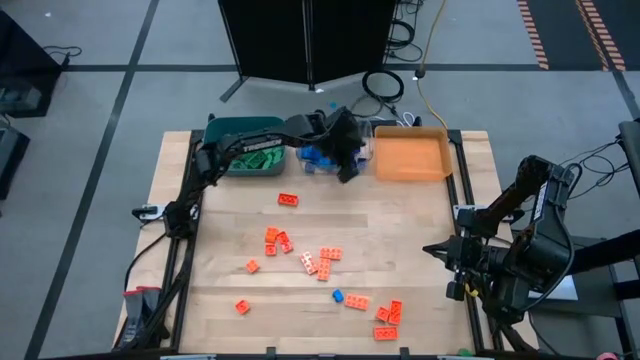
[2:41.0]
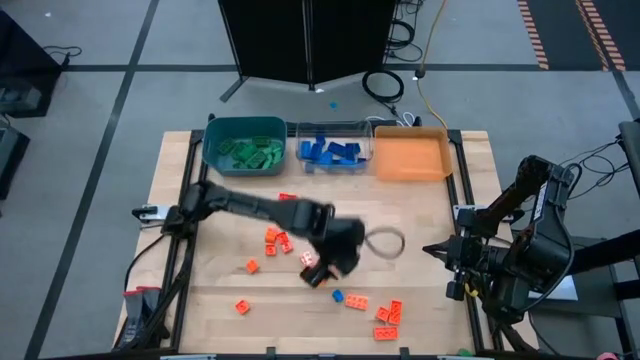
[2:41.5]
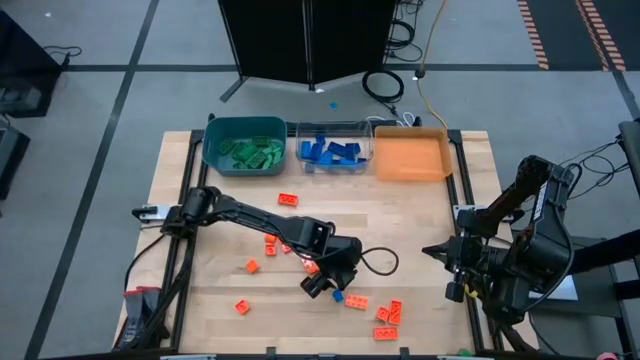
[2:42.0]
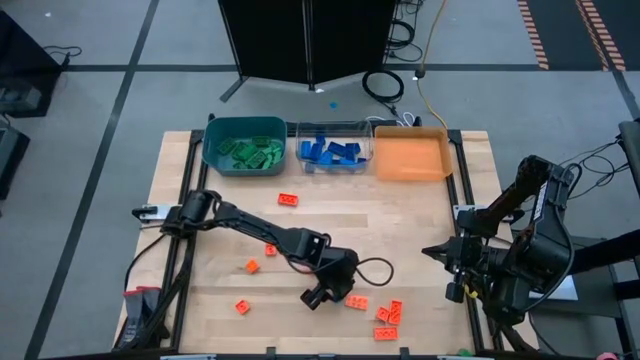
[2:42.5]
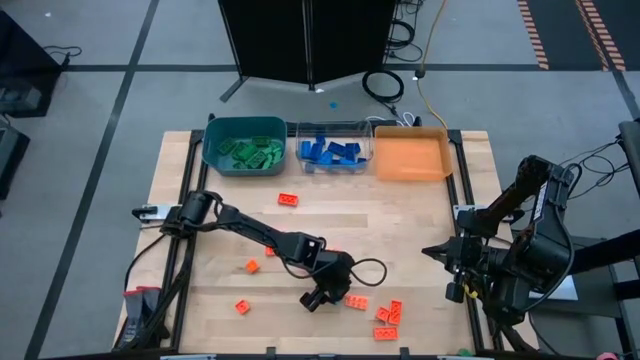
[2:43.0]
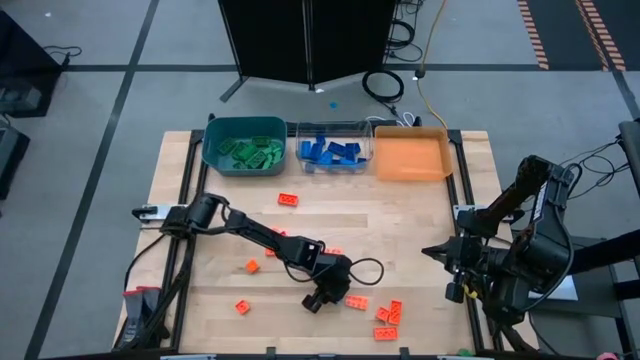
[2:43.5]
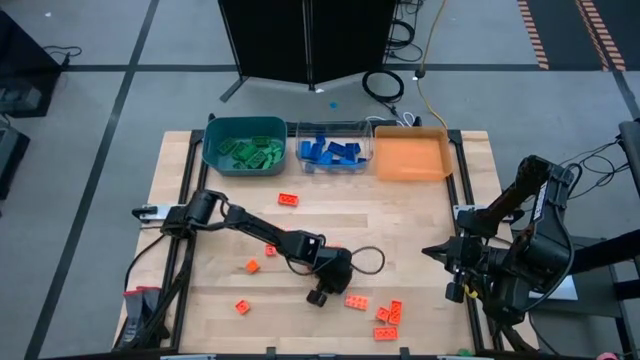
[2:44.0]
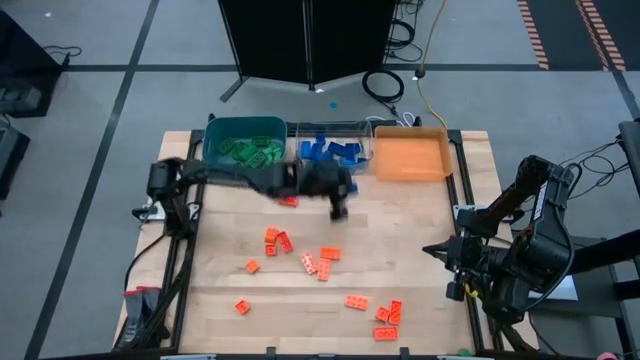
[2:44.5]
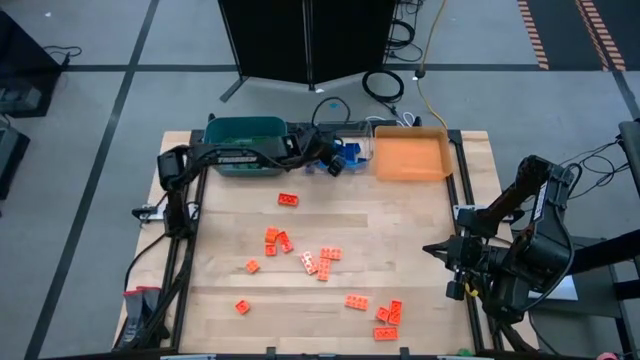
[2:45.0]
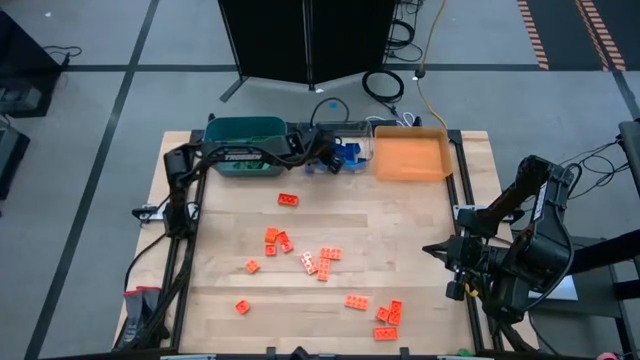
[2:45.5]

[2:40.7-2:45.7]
Task: Sort blocks
Put the blue game piece into the transparent bin

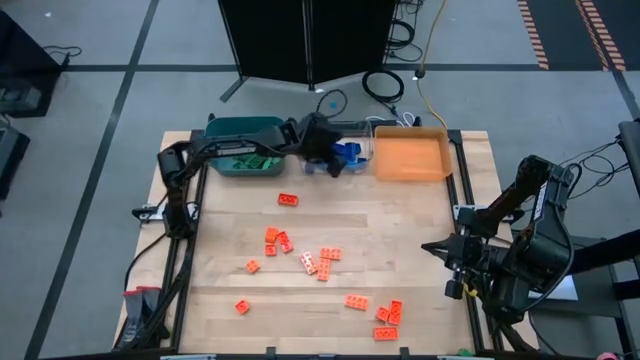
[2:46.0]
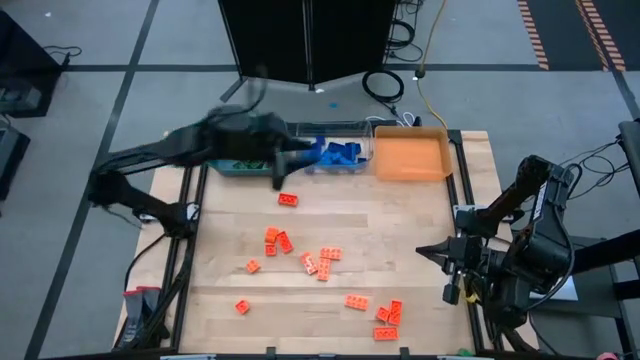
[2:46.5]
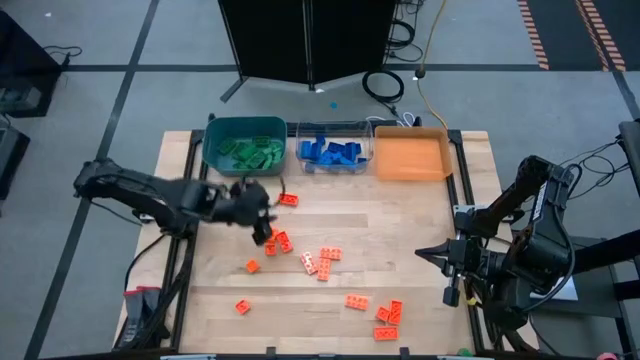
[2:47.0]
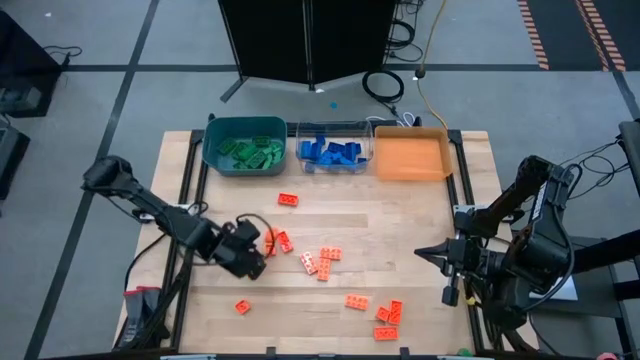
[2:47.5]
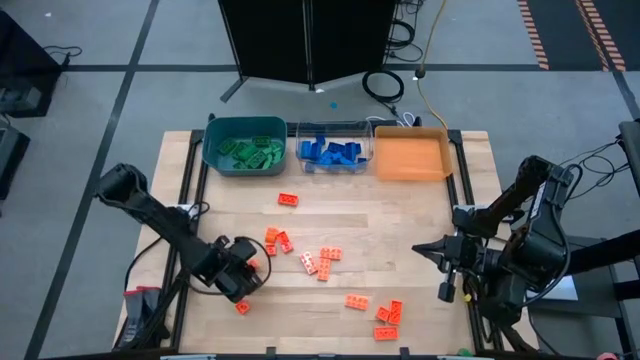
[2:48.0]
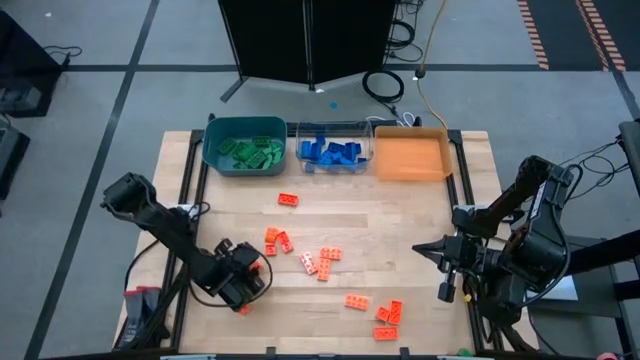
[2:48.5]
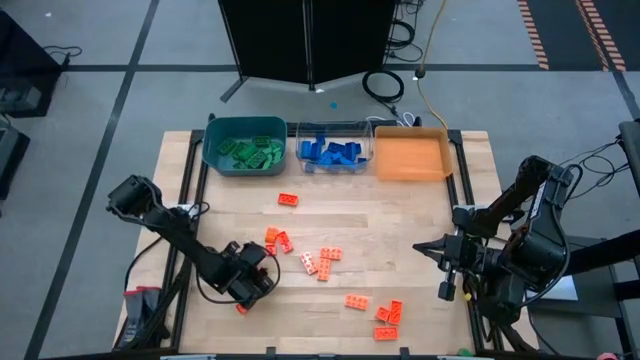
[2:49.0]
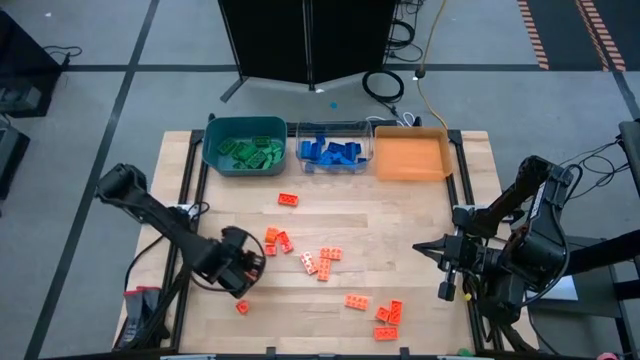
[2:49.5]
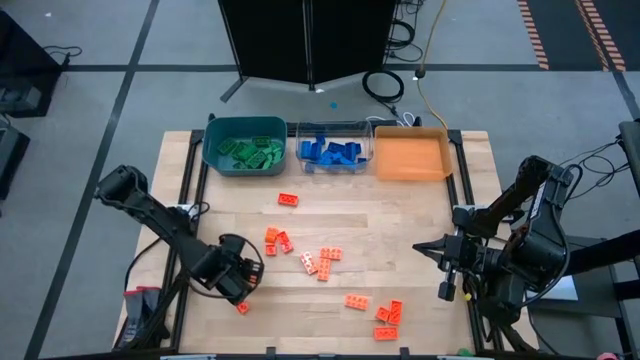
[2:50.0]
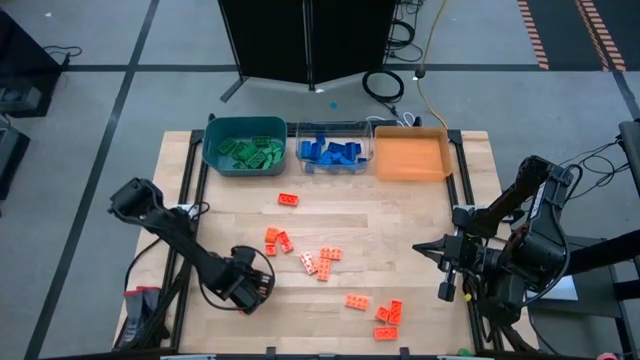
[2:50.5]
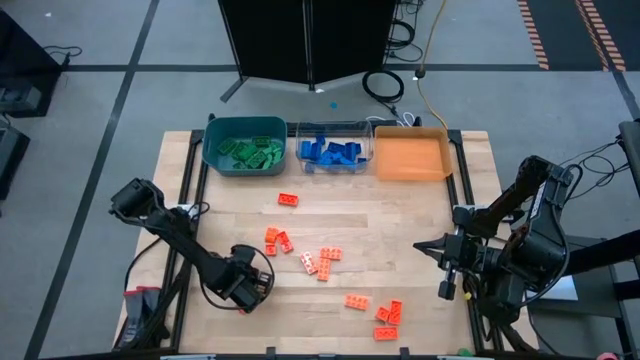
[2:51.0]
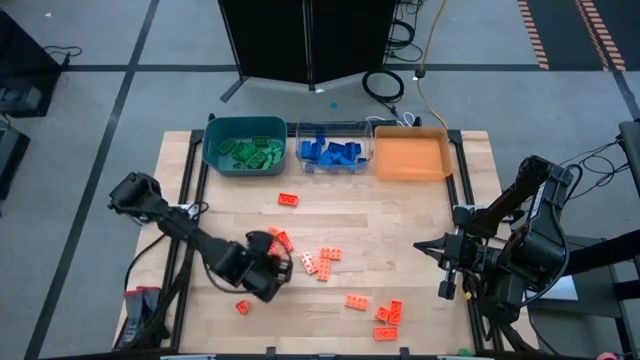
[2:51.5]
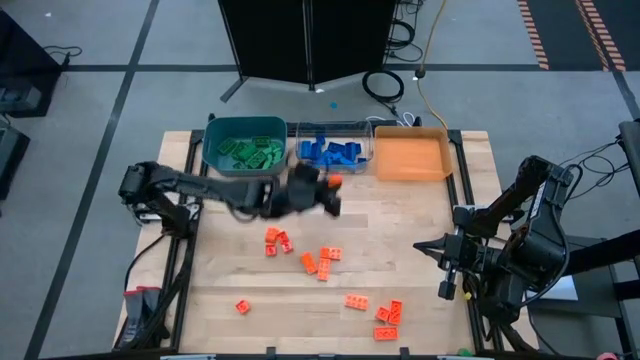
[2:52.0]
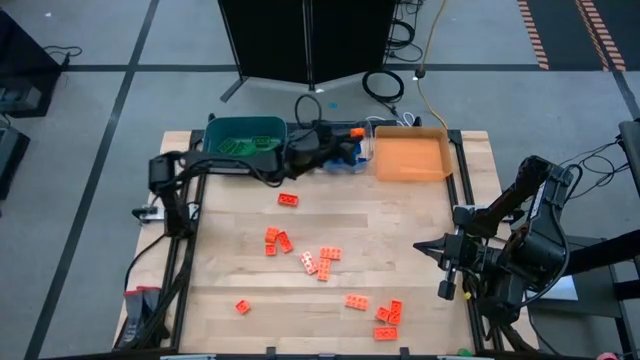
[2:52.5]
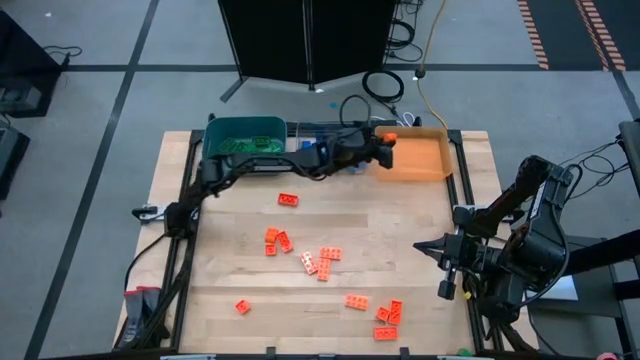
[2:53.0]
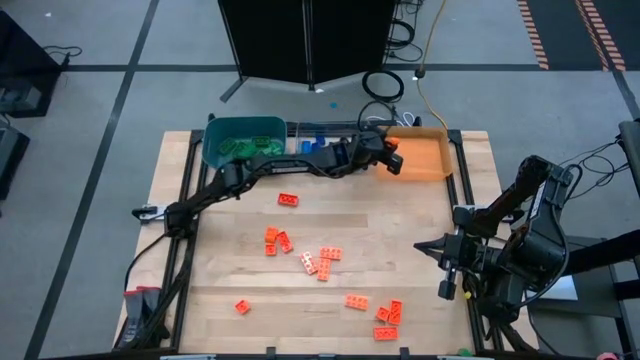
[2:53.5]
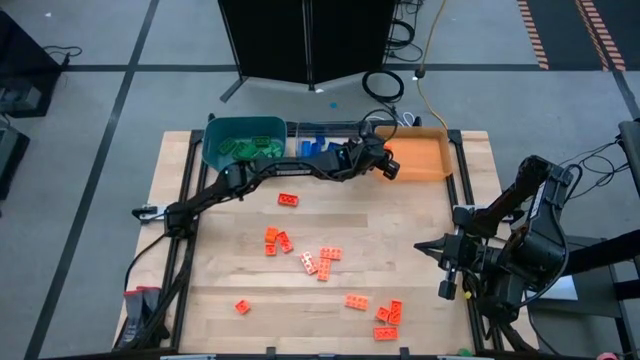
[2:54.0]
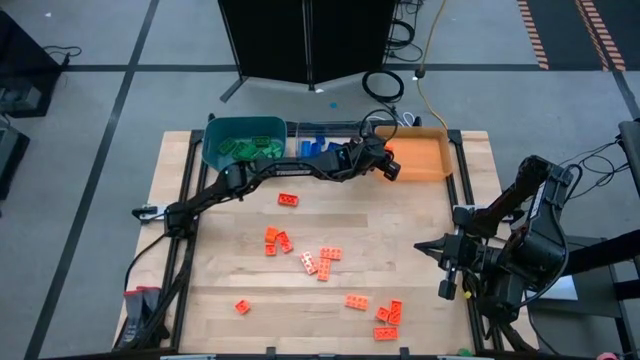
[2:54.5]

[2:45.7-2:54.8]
Put the orange game piece into the orange transparent bin

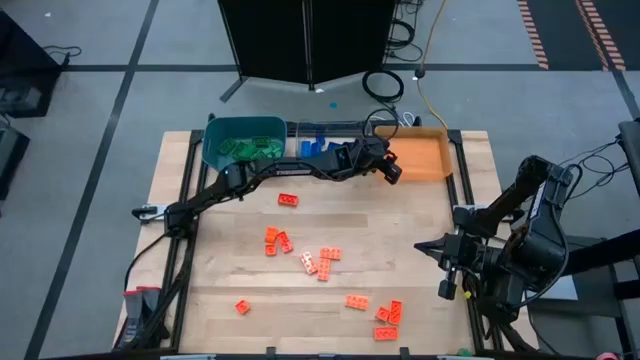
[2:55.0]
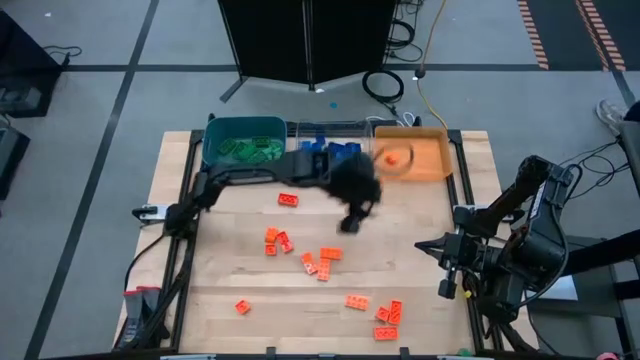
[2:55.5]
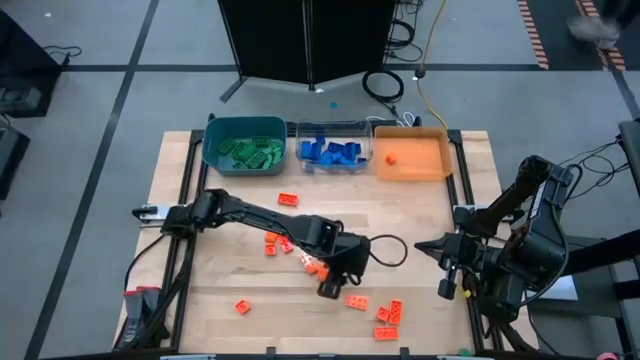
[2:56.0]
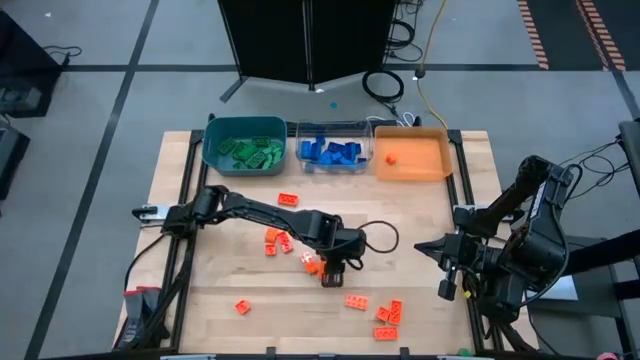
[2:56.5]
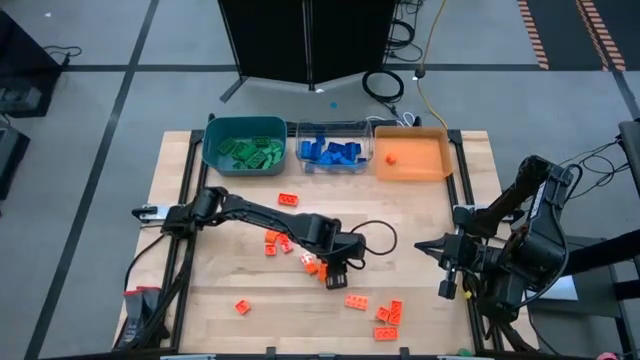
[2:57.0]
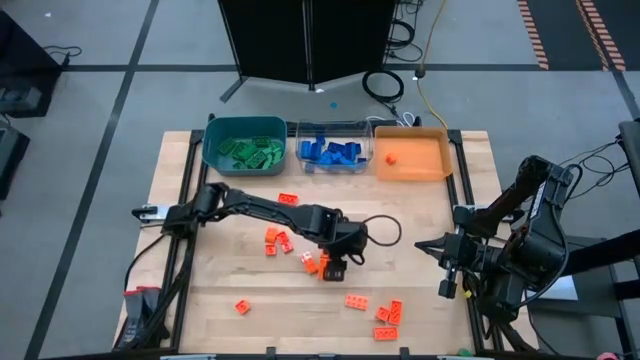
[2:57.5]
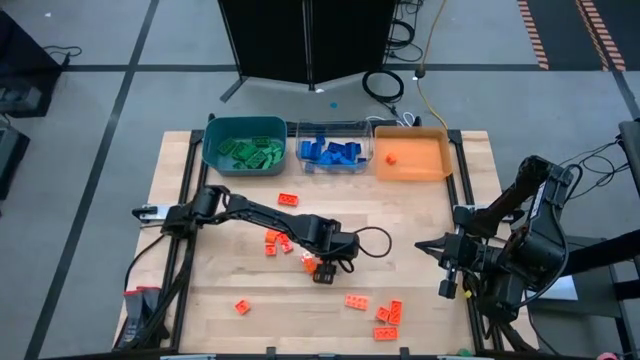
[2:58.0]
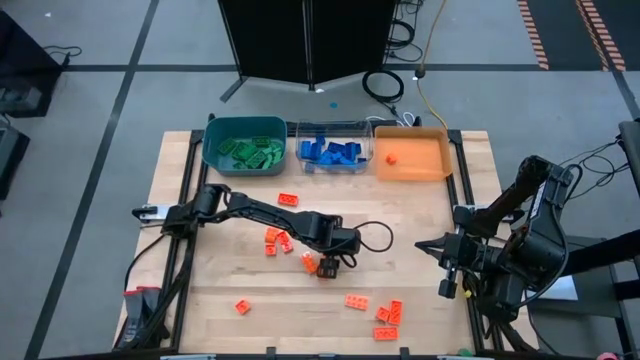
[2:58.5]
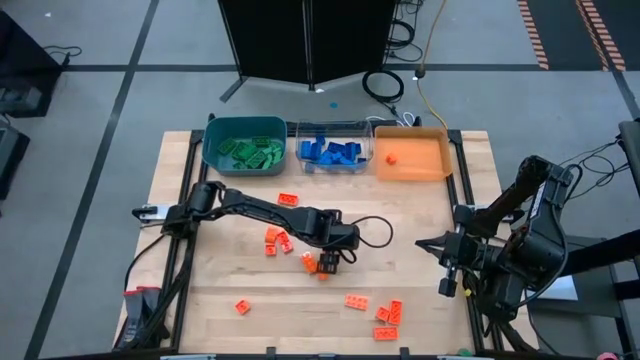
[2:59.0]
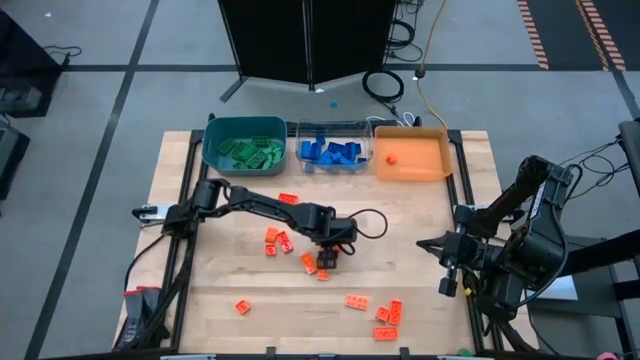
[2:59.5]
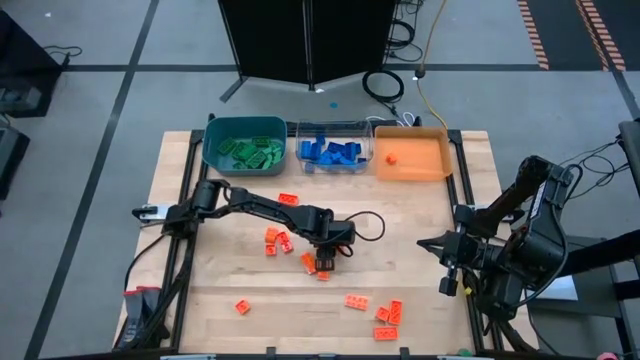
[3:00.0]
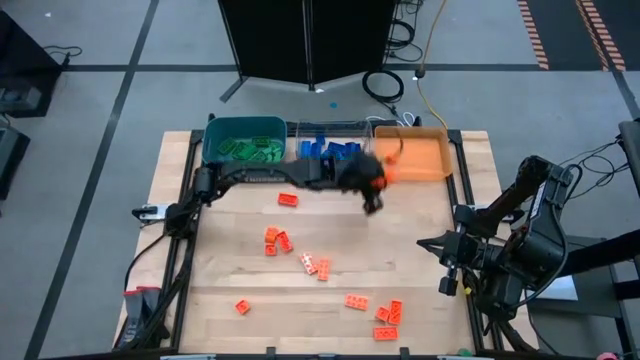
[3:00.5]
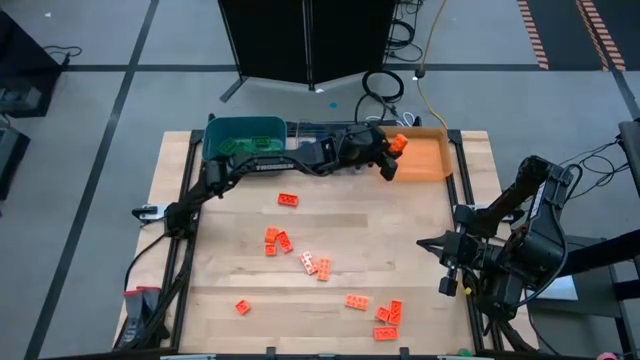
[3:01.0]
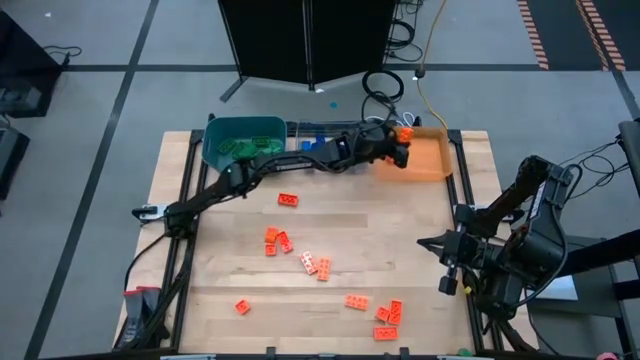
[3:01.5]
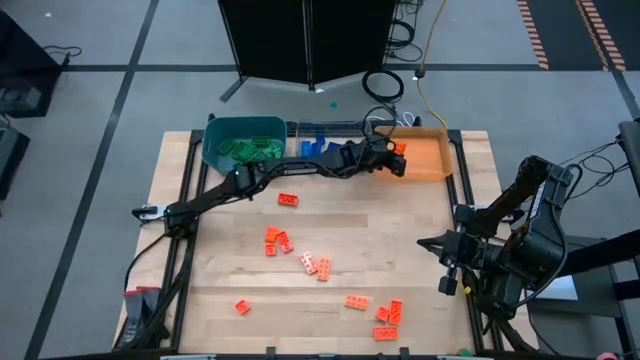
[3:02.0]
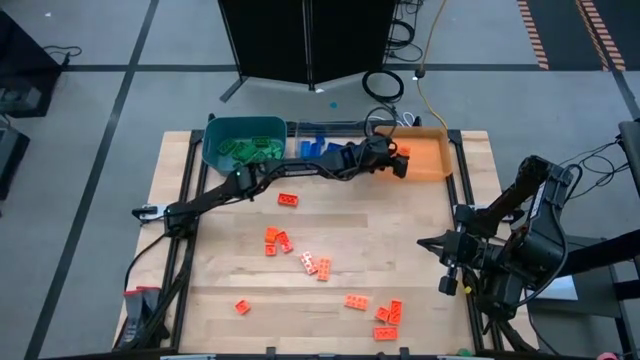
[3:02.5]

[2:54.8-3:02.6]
Put the orange game piece into the orange transparent bin
